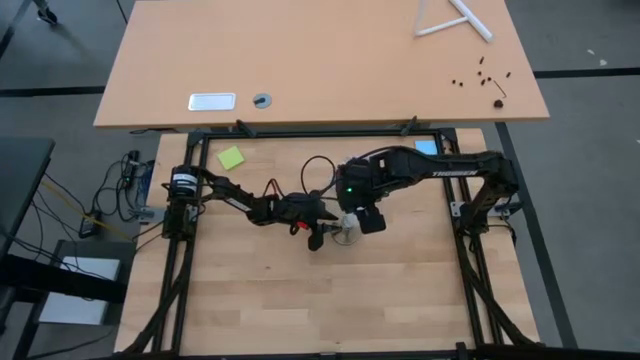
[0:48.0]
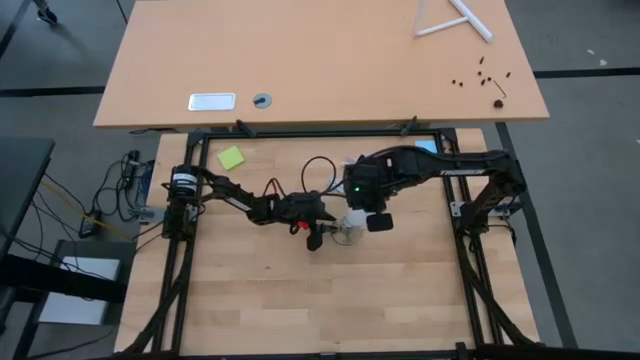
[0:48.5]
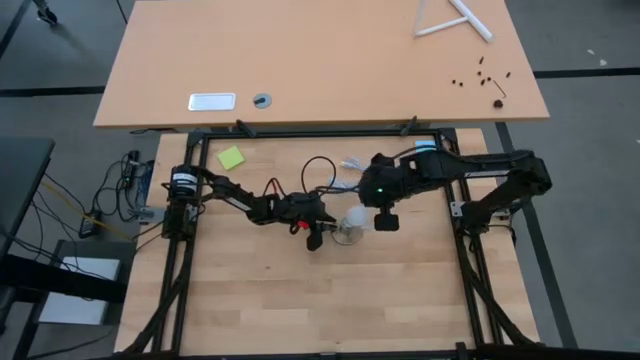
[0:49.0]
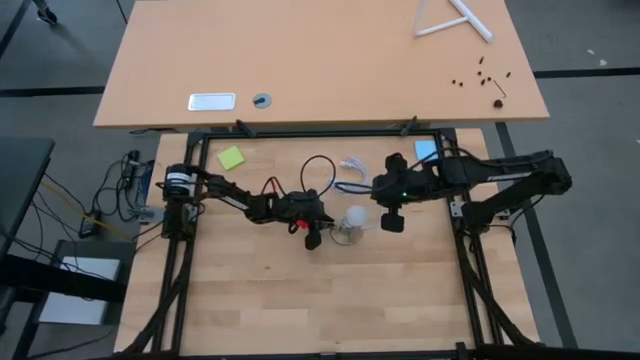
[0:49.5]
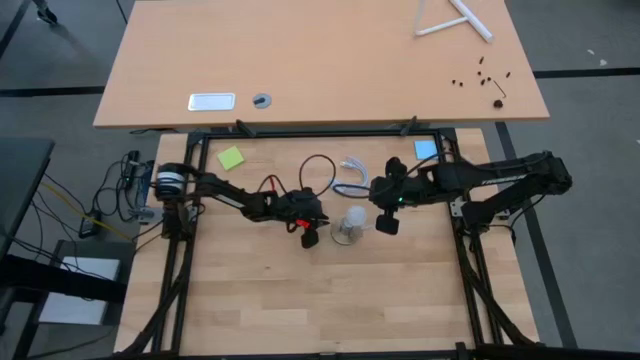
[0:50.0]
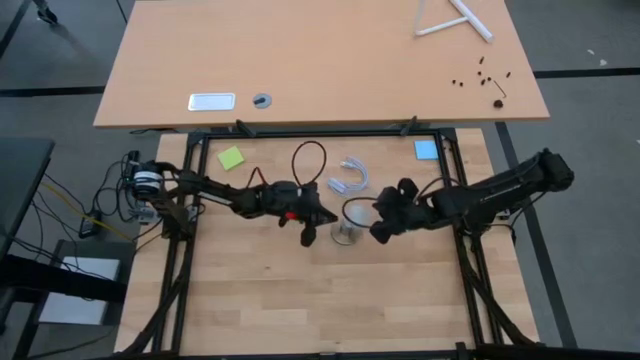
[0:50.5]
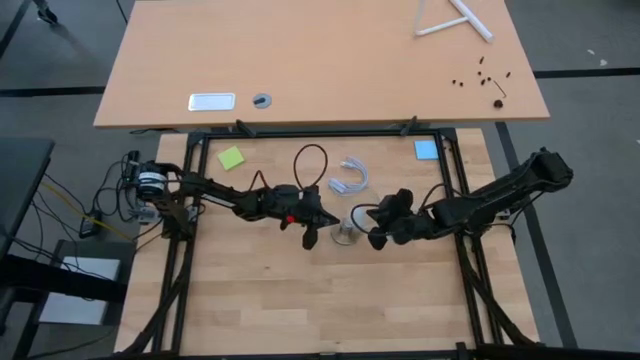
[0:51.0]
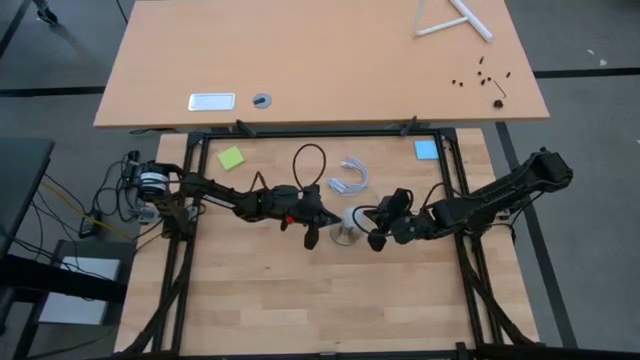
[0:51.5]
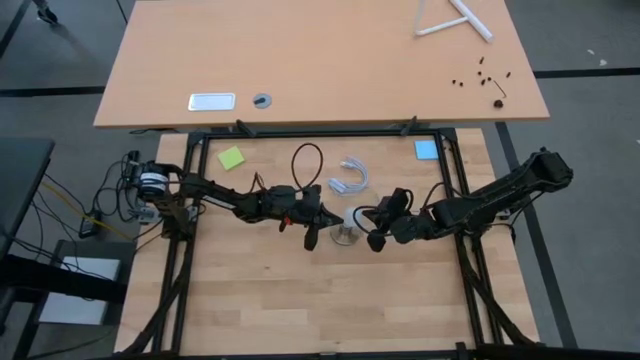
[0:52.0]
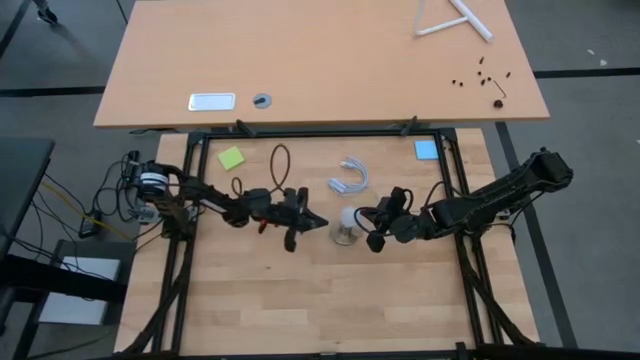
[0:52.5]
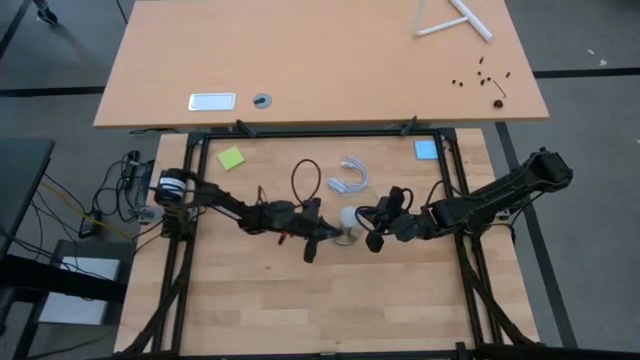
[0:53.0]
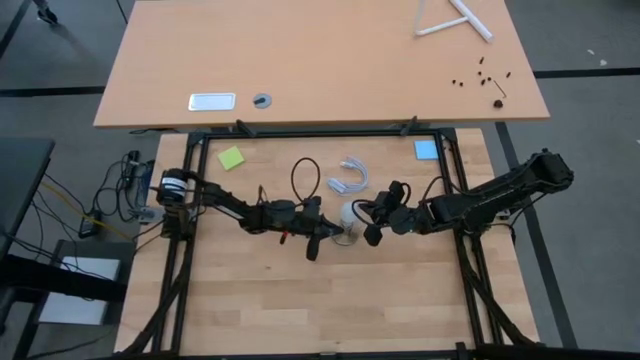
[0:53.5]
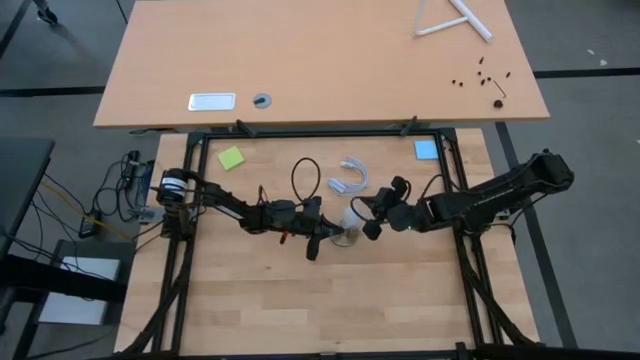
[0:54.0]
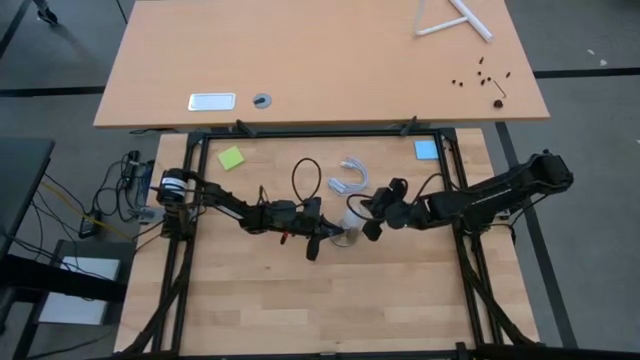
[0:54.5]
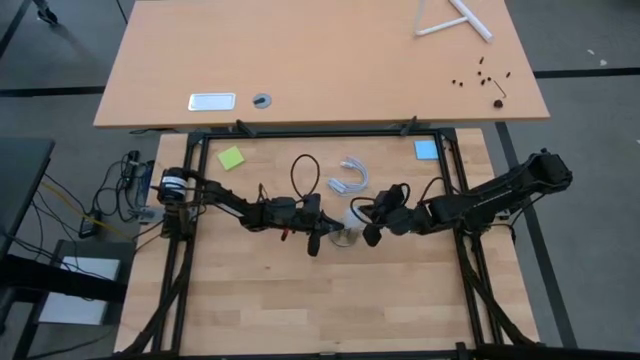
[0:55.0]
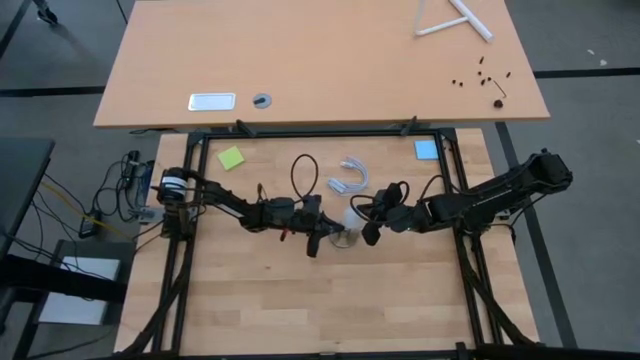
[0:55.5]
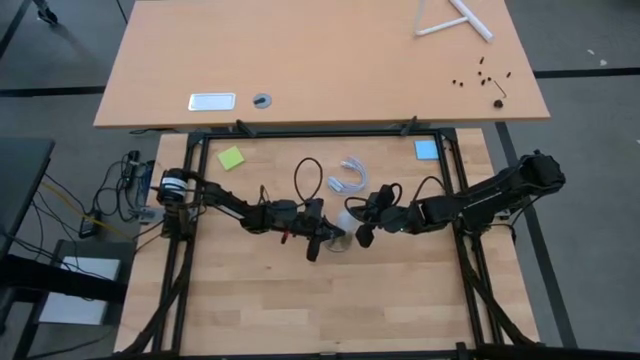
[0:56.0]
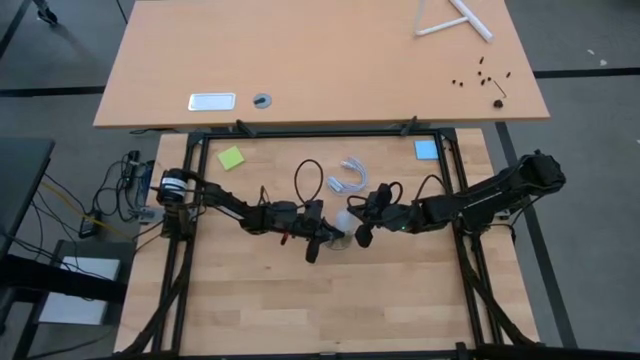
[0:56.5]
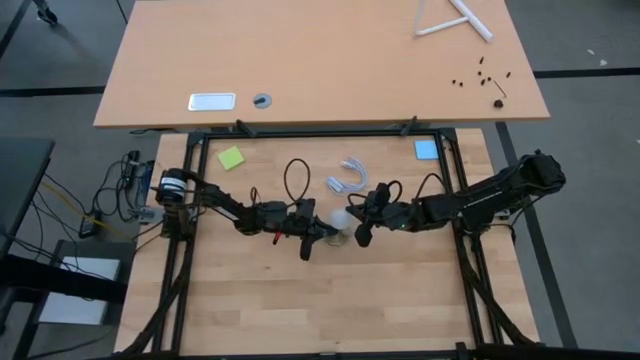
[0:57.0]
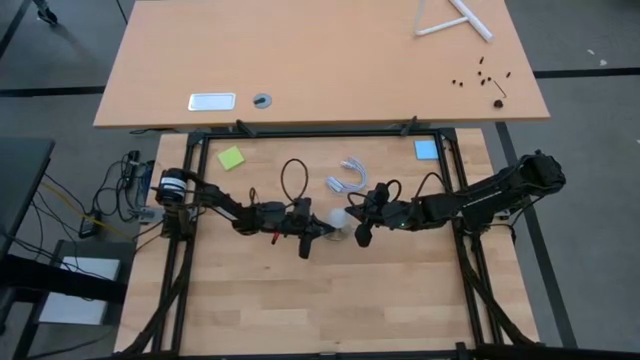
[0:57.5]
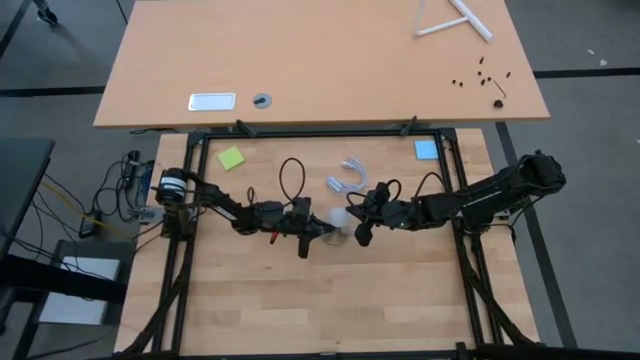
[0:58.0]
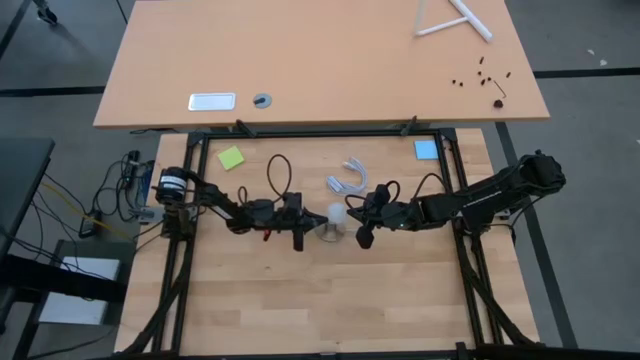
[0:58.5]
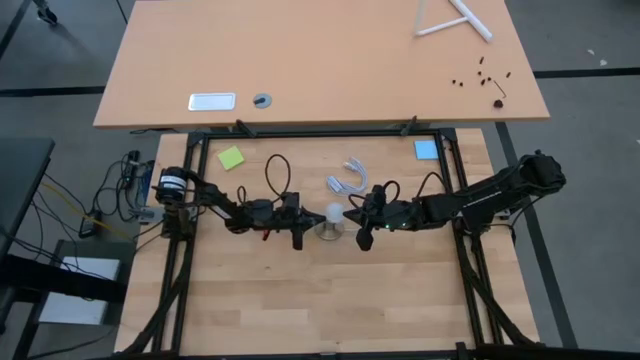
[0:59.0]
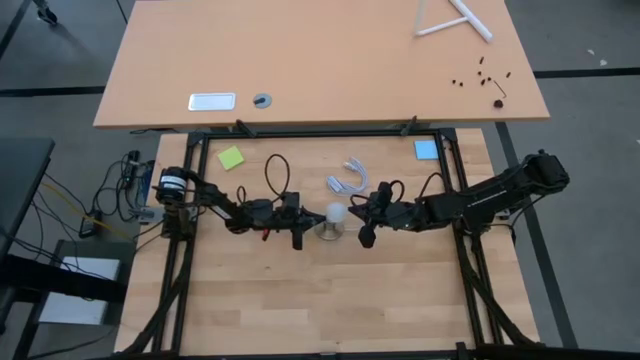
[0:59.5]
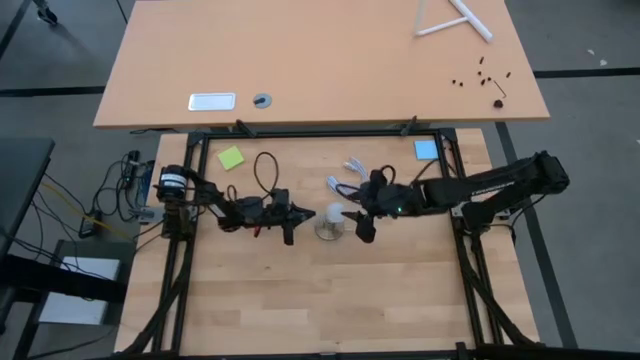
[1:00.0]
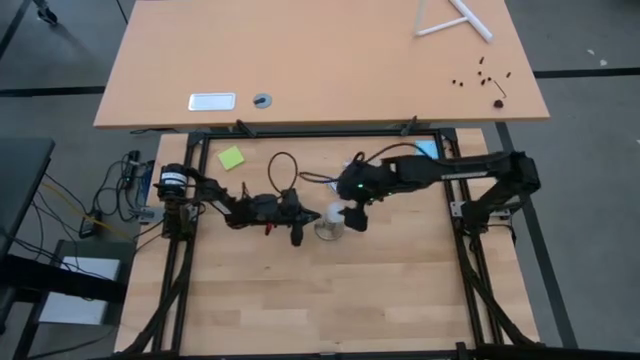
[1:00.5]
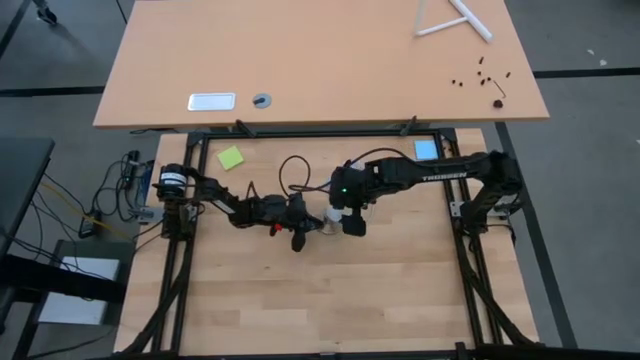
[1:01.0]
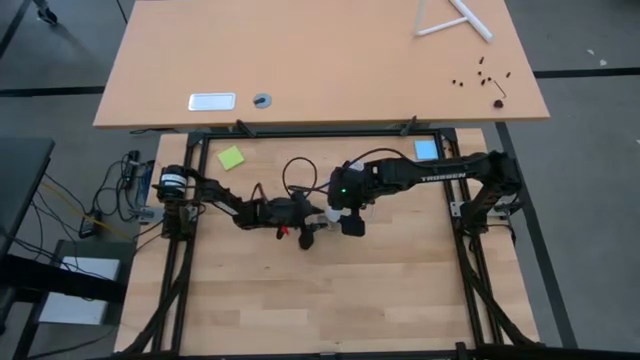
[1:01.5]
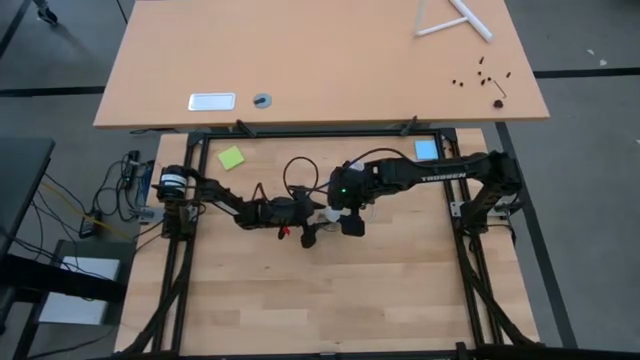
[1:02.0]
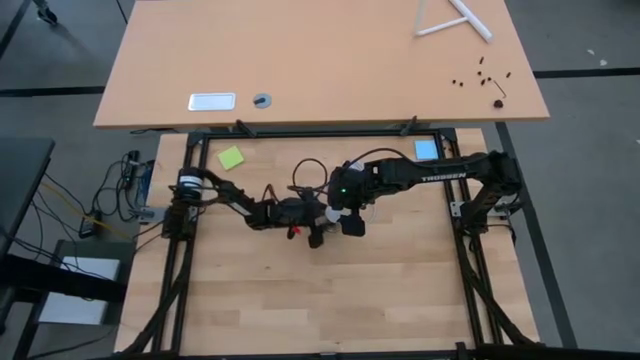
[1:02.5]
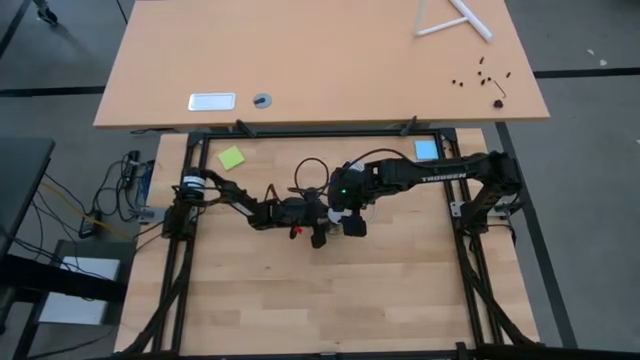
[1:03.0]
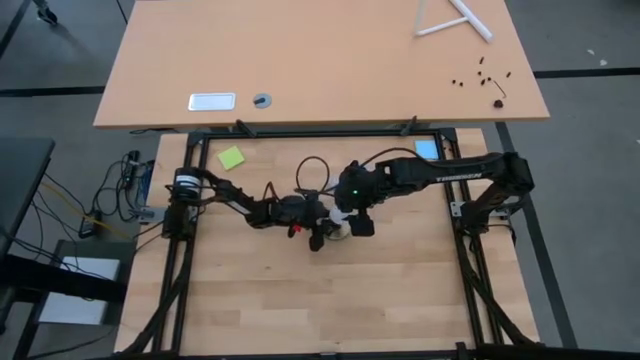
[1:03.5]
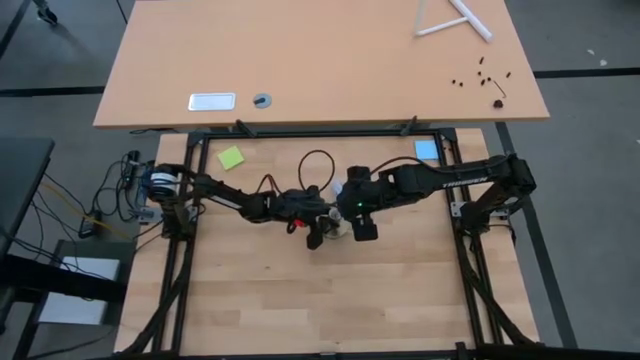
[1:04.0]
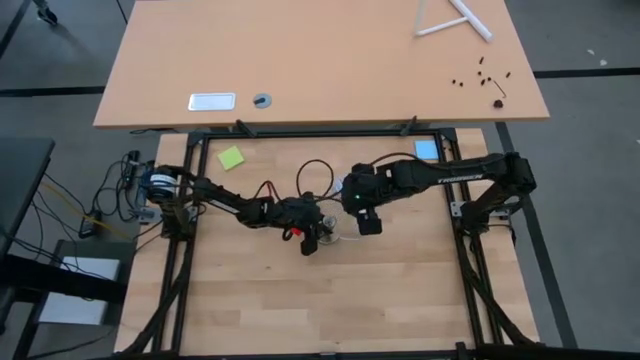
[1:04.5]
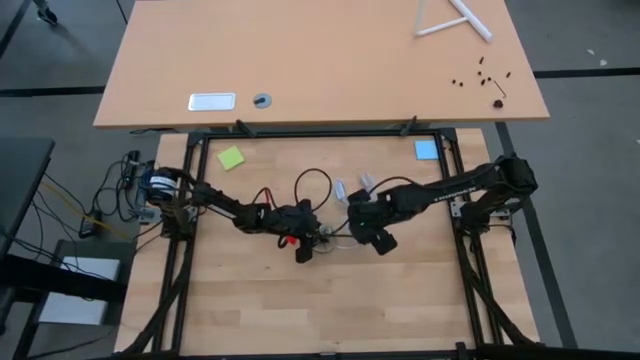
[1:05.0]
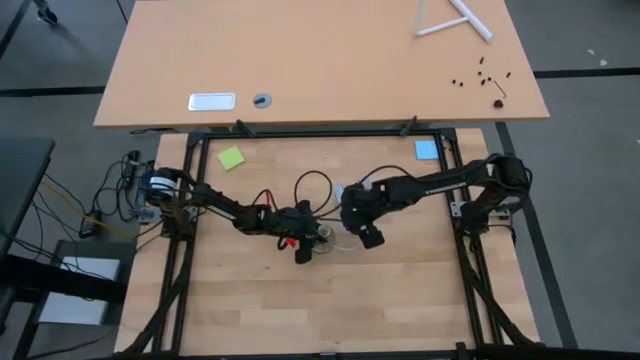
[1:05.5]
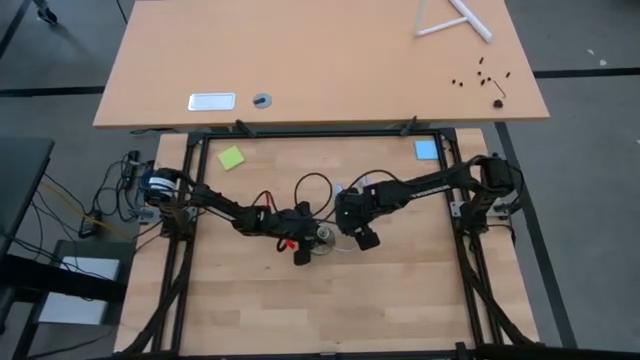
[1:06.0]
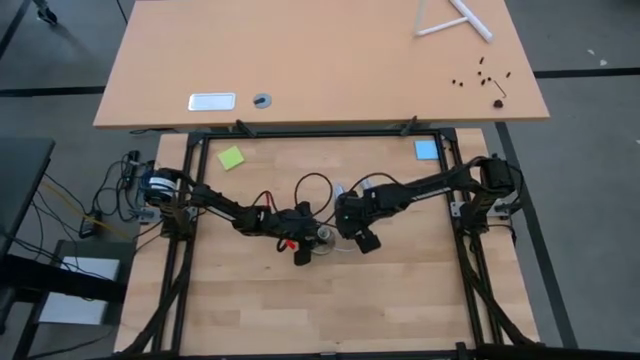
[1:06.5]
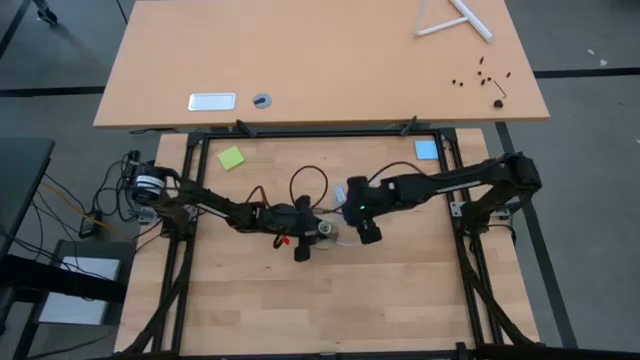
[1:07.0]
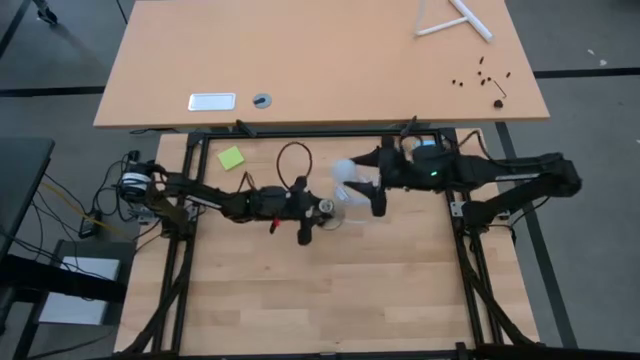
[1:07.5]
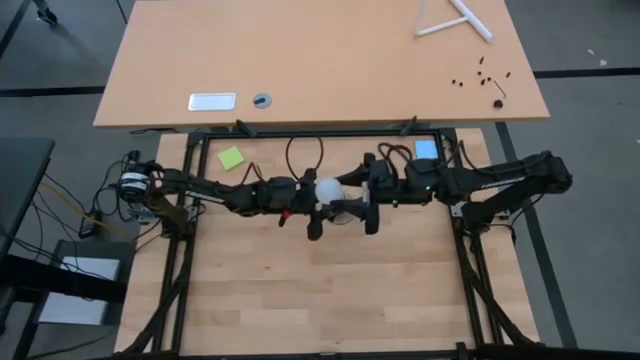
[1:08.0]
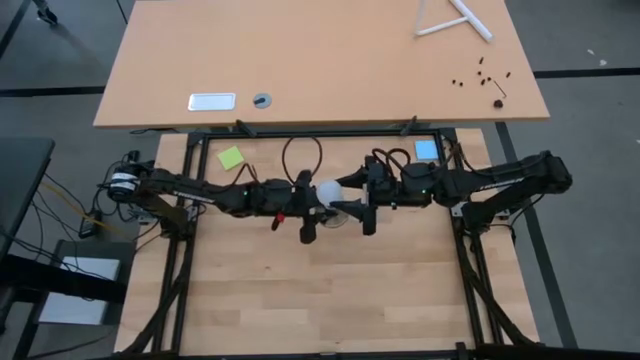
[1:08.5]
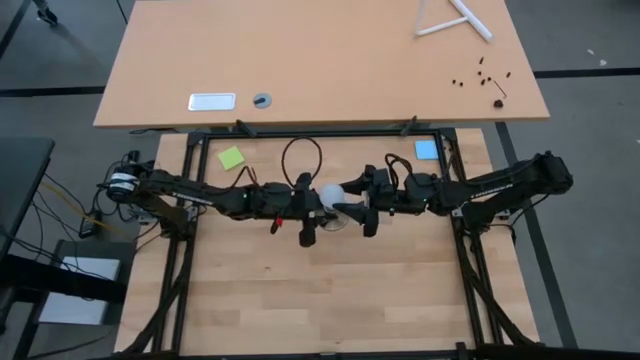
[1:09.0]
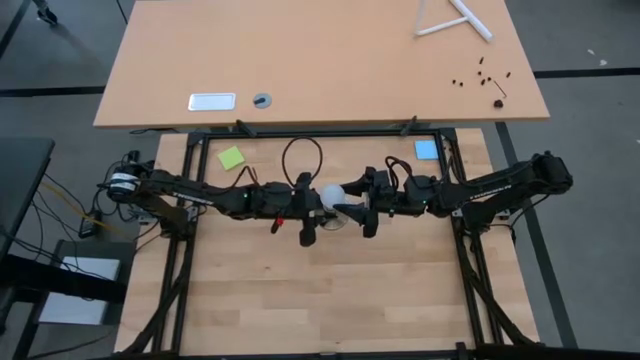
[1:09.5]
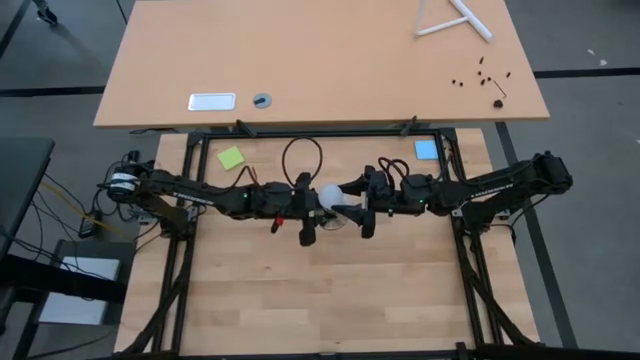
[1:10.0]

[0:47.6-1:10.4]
Task: Screw lightbulb
Insert the lightbulb into the lamp
